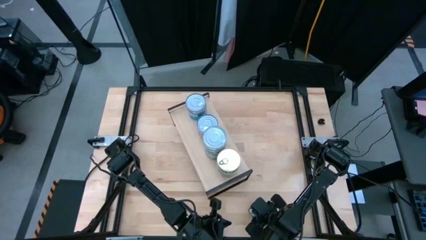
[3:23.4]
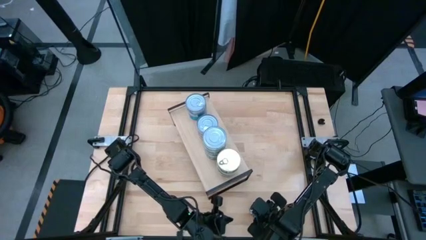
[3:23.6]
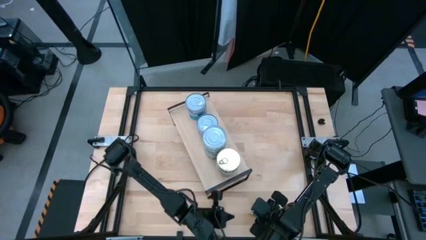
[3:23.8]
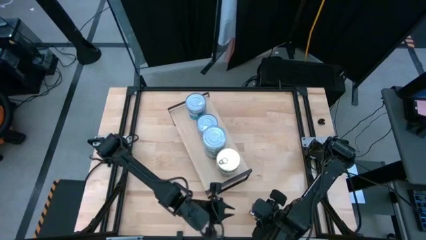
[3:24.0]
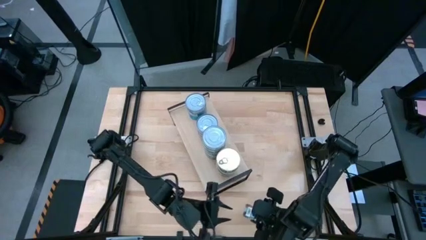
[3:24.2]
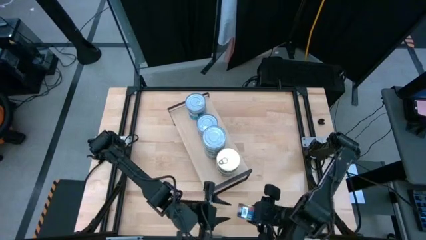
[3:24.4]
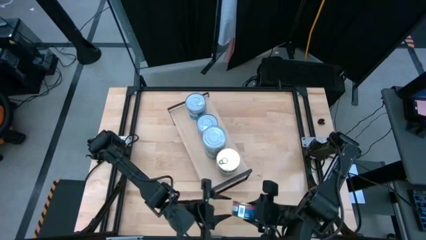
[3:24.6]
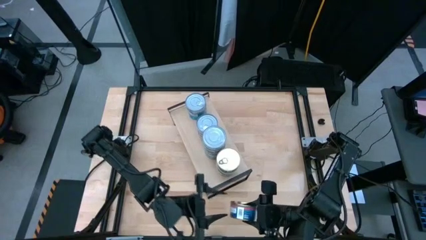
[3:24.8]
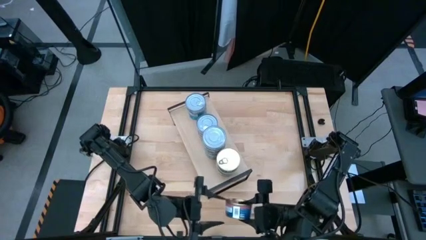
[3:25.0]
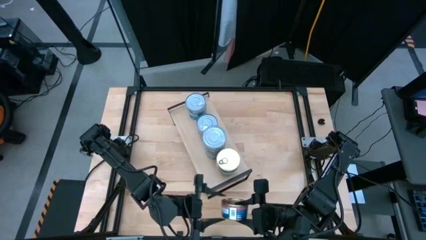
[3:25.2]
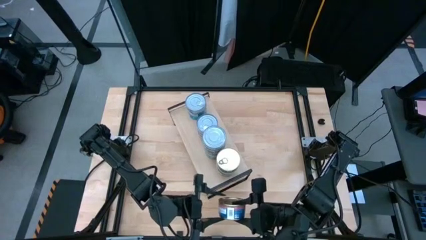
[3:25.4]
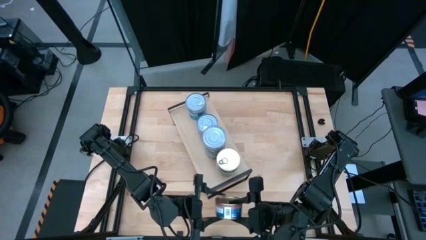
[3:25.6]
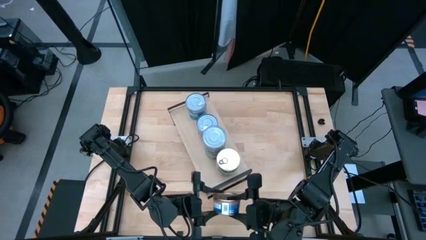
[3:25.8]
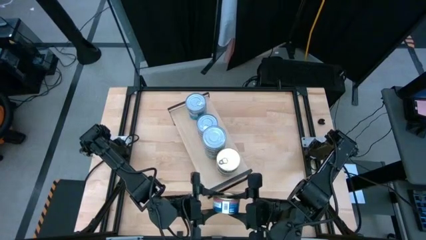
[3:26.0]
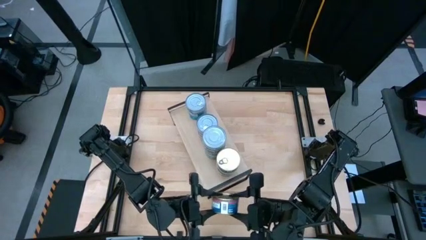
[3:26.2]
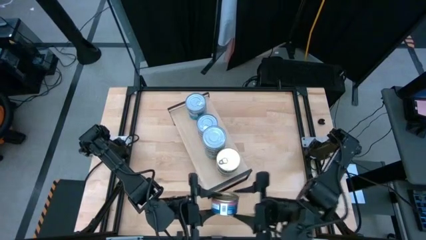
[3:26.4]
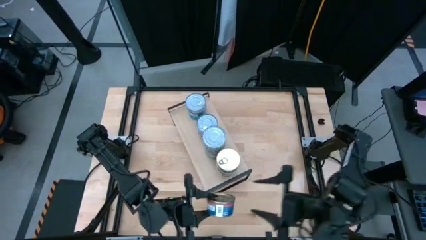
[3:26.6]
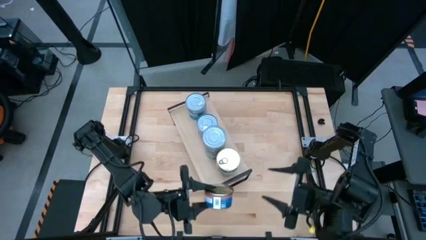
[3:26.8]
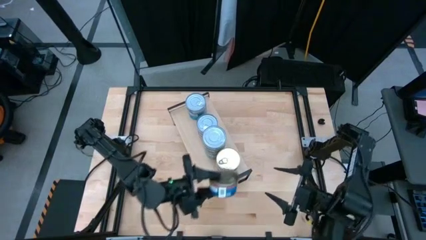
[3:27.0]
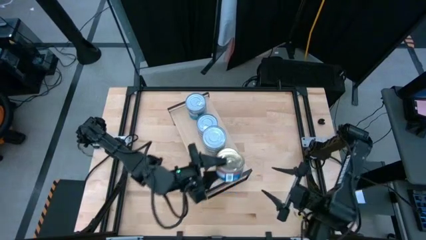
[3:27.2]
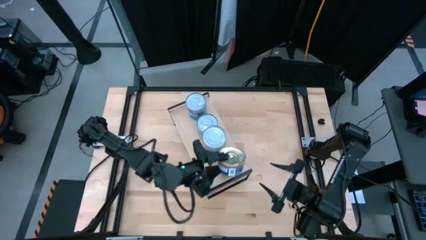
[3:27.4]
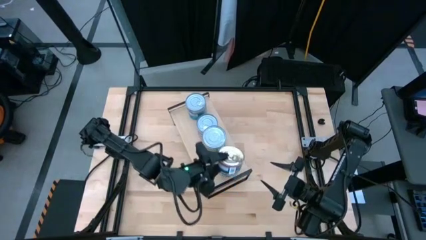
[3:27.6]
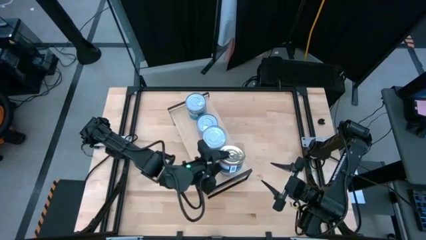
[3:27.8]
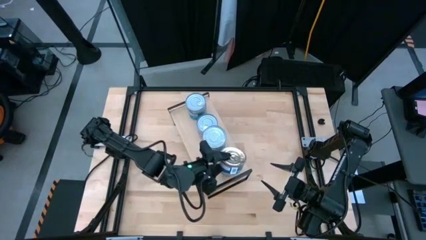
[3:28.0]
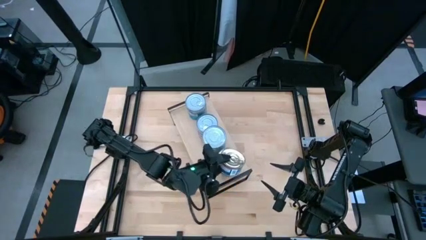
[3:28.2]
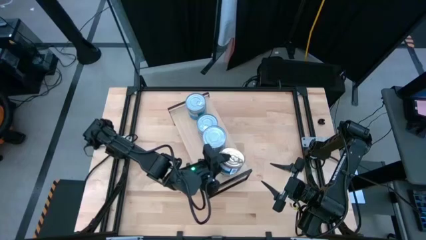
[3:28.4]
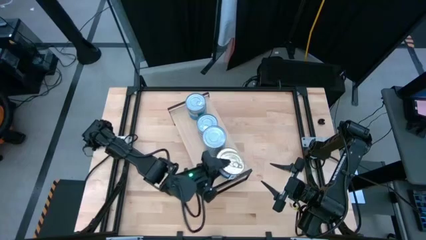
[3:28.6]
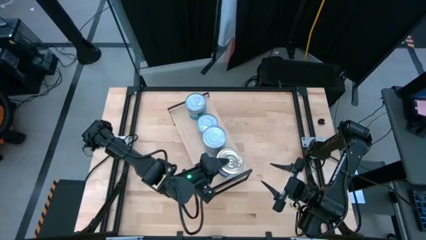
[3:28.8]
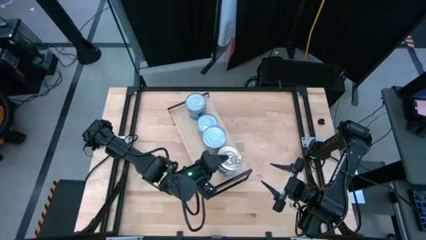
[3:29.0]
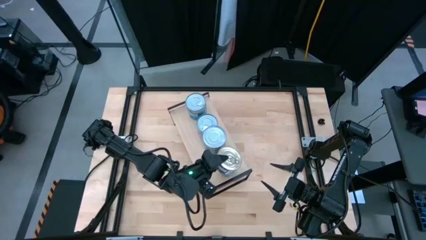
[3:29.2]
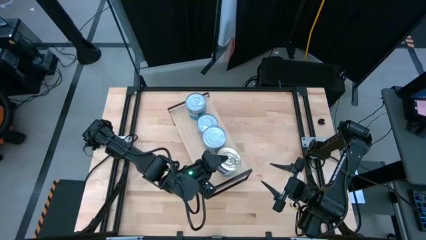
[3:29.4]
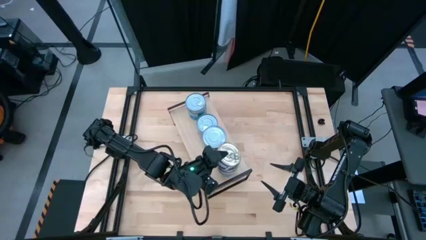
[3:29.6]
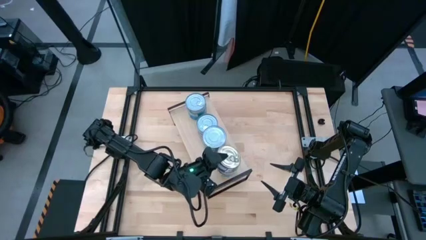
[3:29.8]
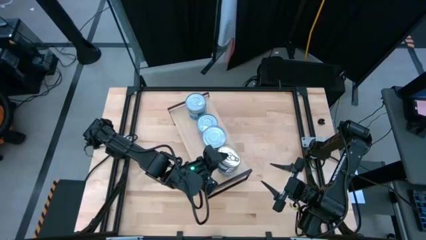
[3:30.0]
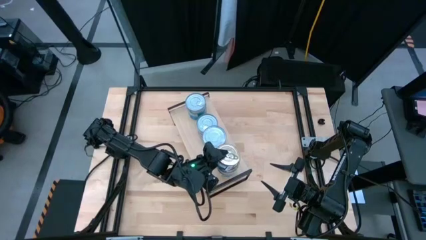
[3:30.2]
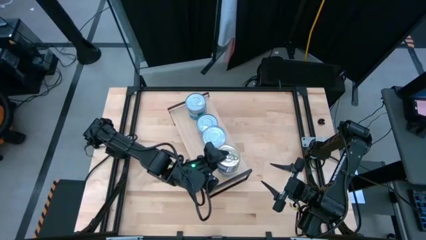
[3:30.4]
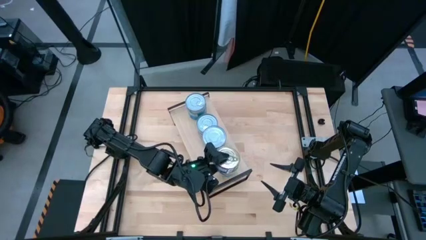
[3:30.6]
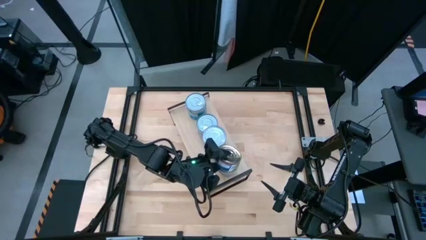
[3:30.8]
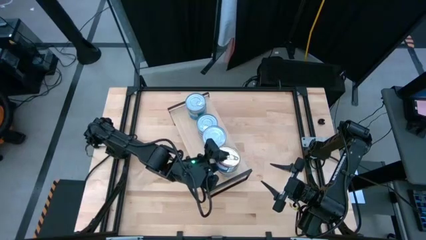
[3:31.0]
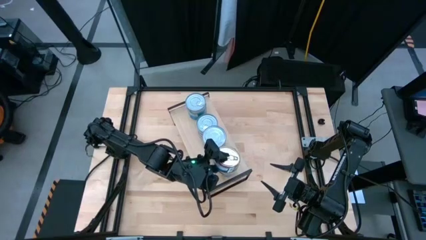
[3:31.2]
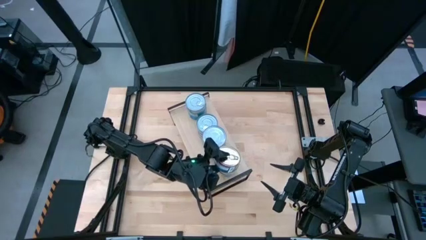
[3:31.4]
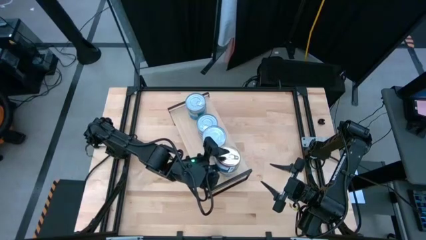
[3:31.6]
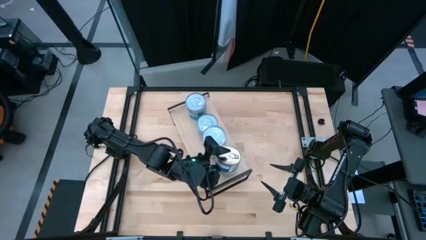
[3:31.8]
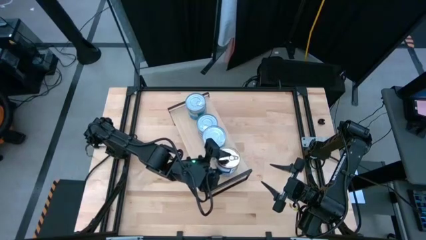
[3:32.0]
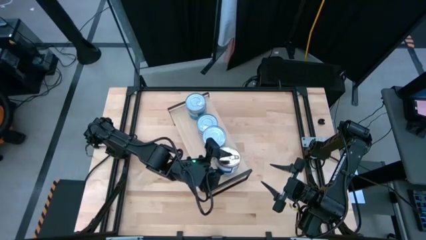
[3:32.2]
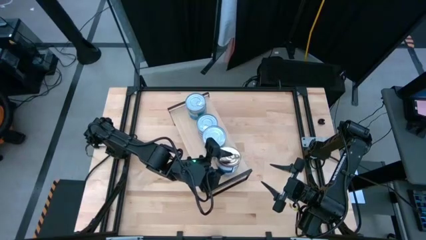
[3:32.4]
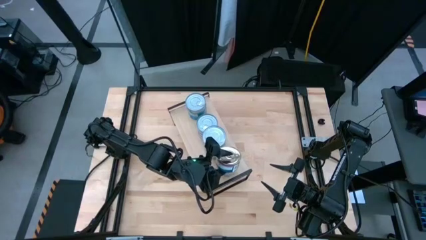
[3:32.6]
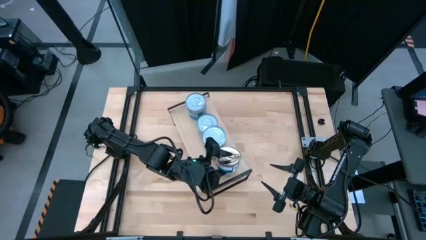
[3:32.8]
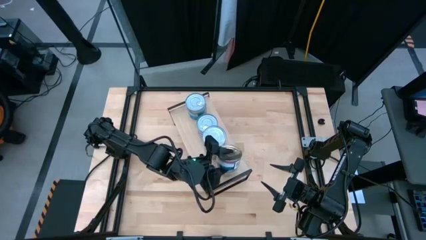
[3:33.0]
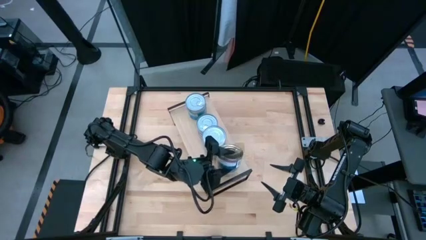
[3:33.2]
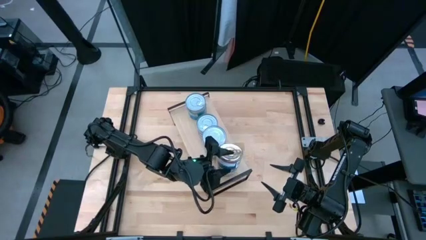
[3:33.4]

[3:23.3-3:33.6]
Task: Stack canned seafood by type on shelf
Stack the blue-pink tuna can on top of the blue-pink tuna cans on the shelf

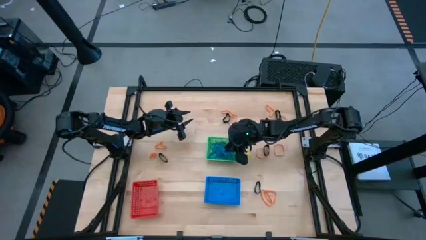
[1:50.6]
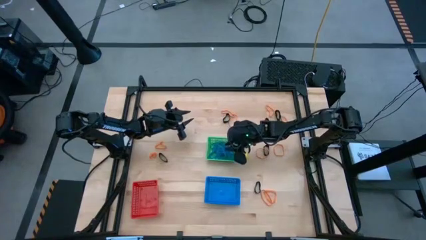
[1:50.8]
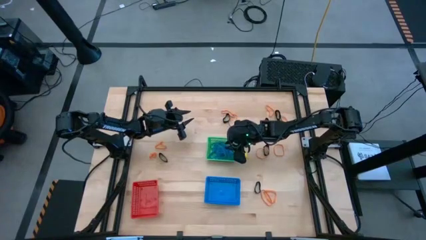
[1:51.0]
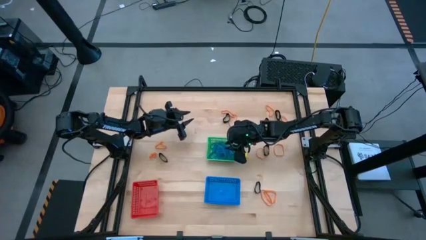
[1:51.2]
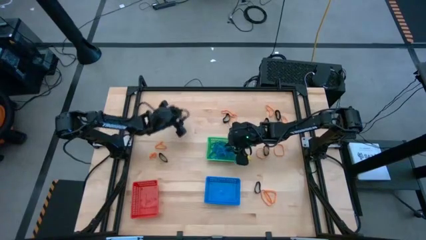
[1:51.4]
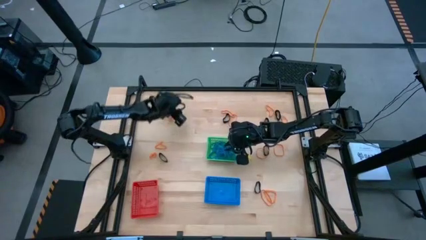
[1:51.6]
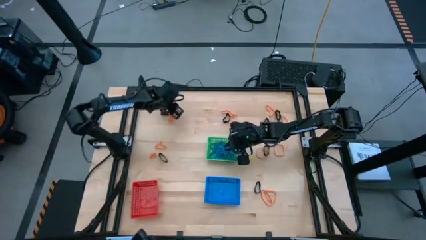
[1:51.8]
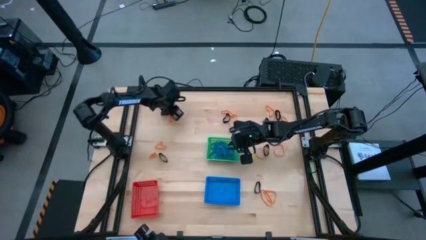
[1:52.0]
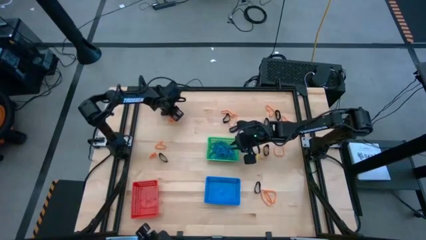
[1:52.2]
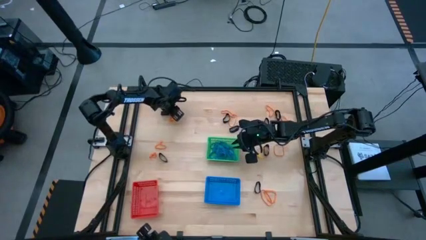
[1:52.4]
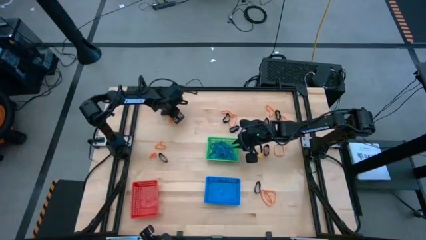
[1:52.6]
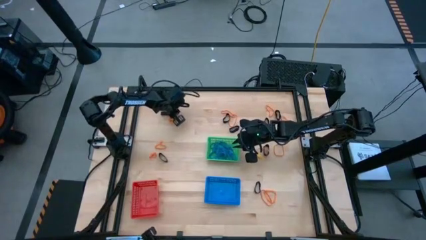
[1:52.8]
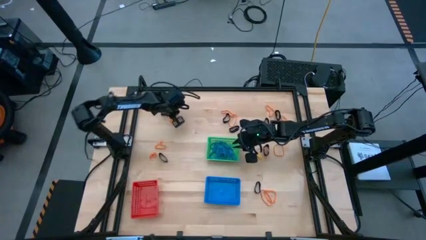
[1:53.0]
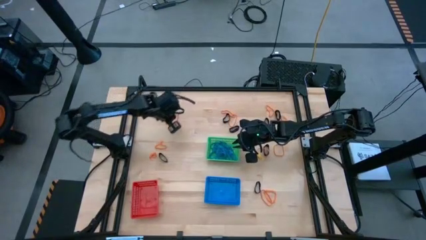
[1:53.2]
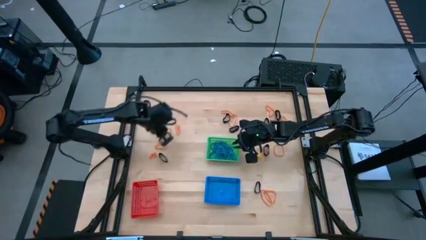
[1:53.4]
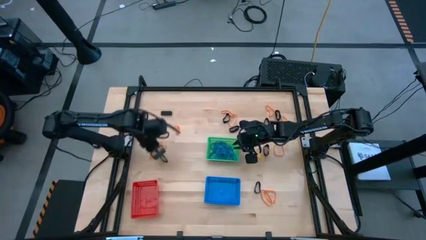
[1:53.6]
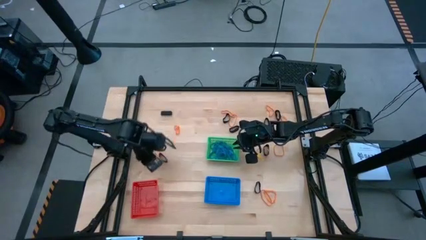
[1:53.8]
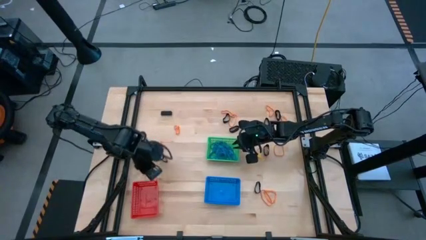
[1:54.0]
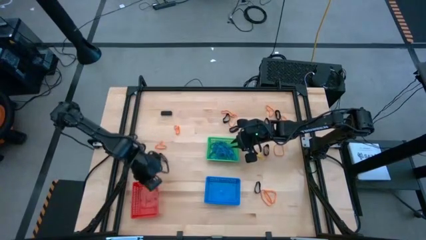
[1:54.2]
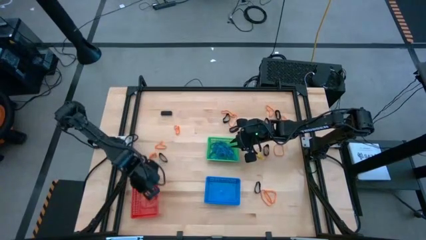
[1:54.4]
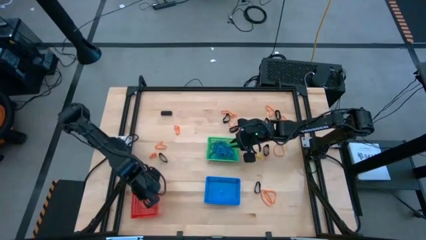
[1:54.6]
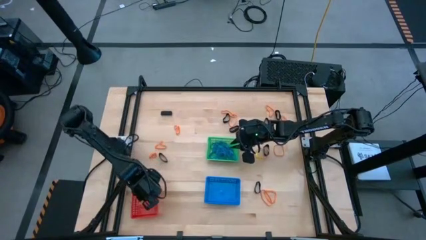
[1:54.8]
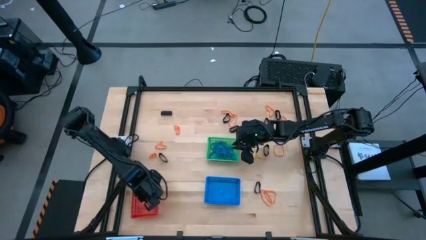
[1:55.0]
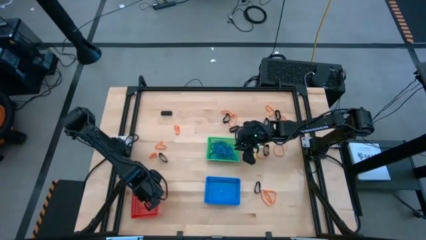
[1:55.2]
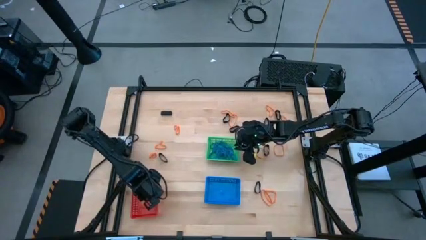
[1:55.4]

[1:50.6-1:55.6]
Task: Sort rubber bands into baskets
Put the orange rubberband into the red bin

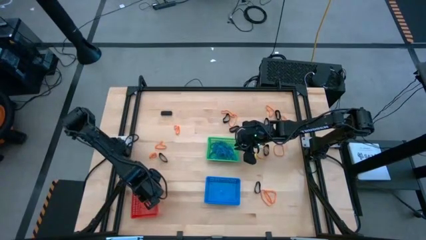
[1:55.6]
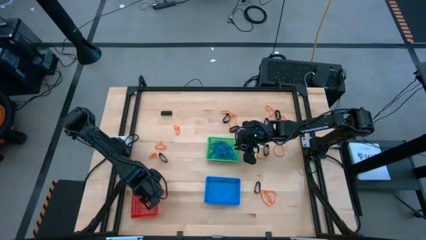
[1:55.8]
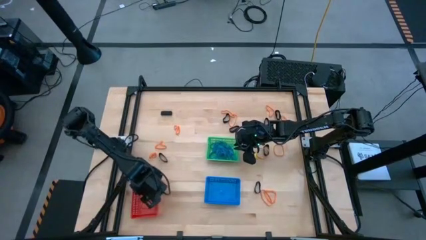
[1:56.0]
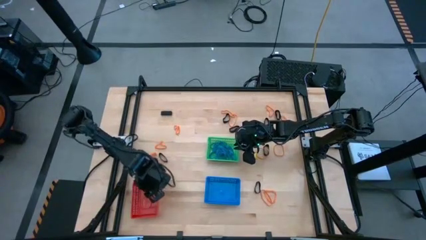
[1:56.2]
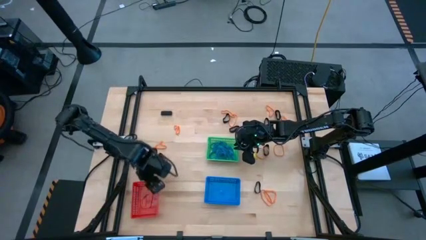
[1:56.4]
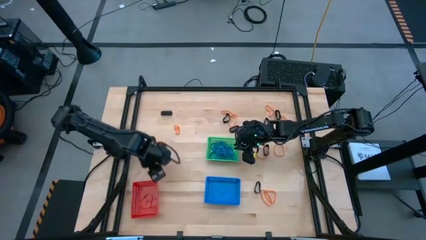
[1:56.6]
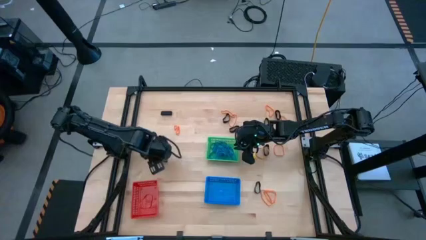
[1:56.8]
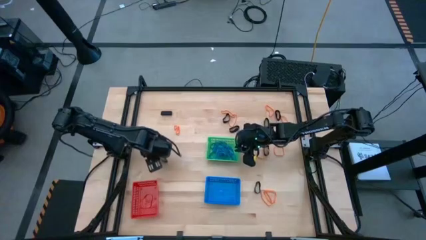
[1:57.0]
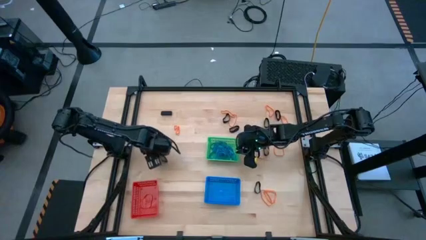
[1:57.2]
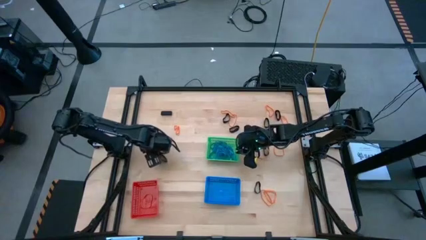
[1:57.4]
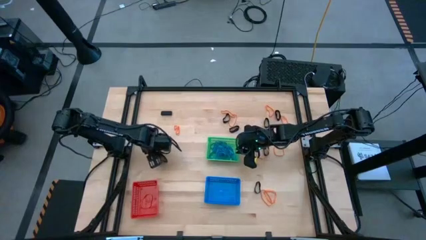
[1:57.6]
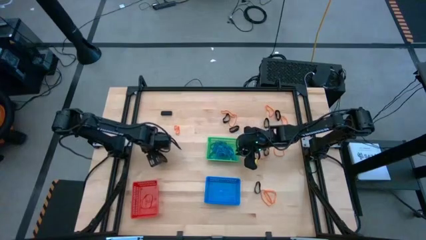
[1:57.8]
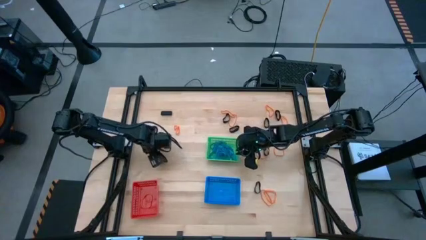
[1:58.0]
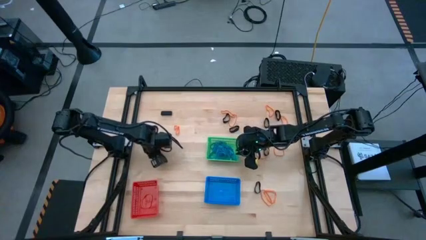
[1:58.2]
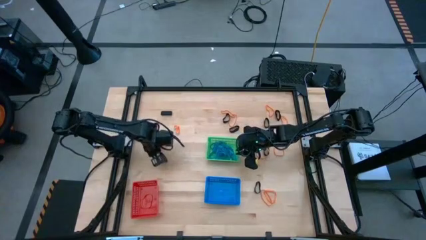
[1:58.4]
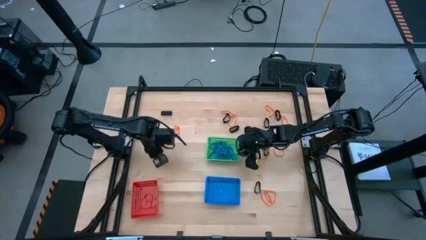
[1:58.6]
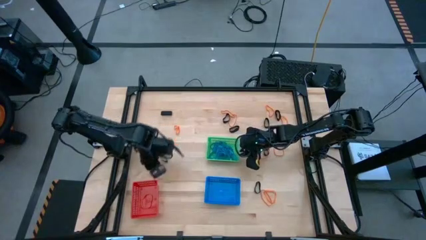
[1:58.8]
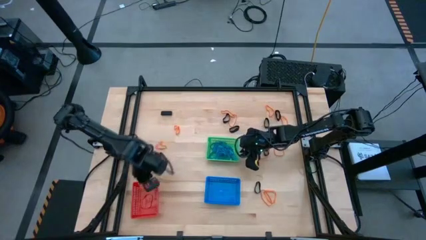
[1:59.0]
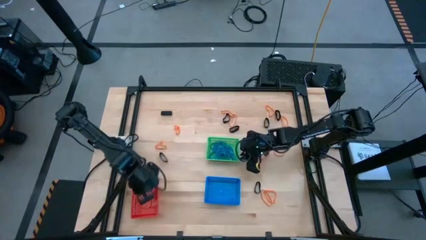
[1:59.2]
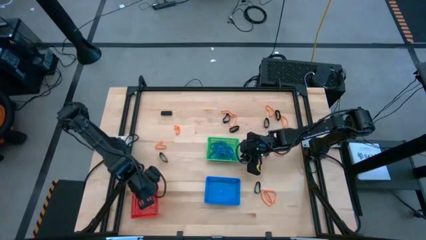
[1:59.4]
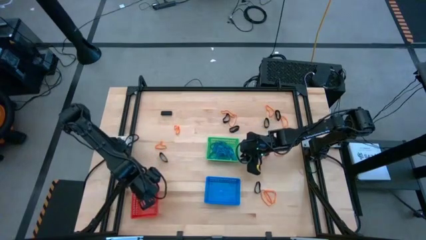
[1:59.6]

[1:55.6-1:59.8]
Put the orange rubberband into the red bin
